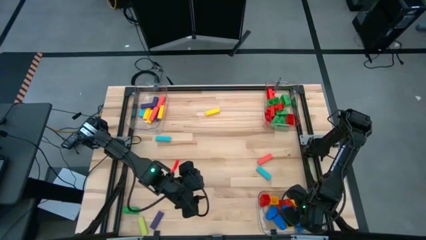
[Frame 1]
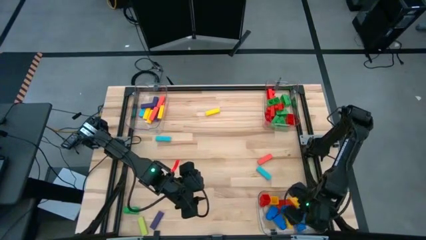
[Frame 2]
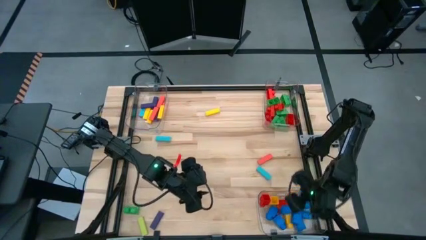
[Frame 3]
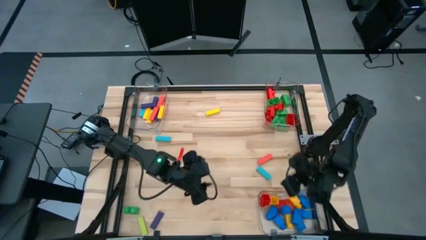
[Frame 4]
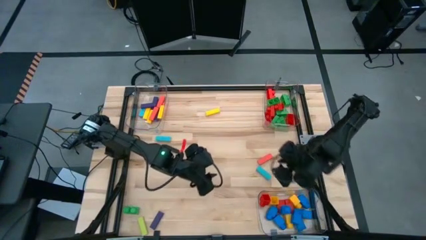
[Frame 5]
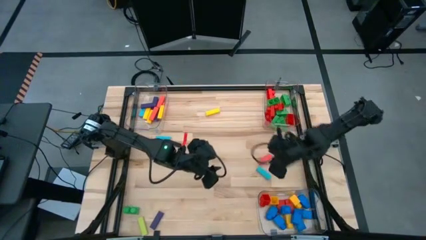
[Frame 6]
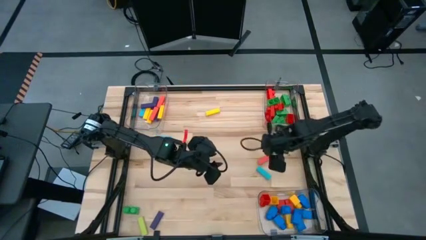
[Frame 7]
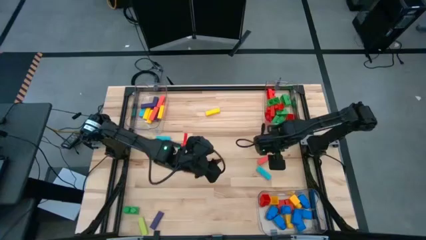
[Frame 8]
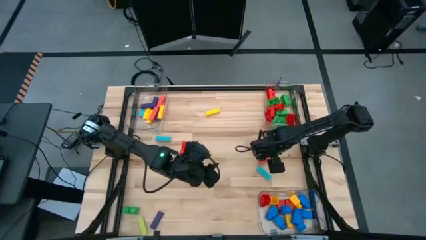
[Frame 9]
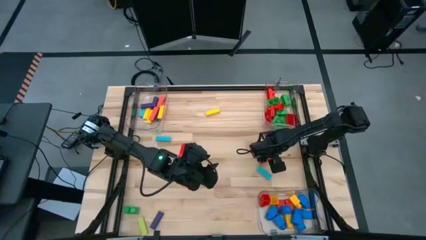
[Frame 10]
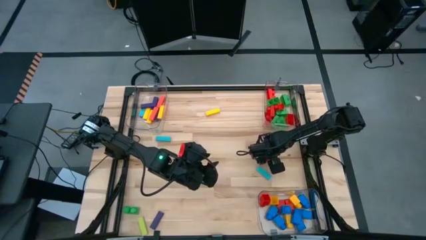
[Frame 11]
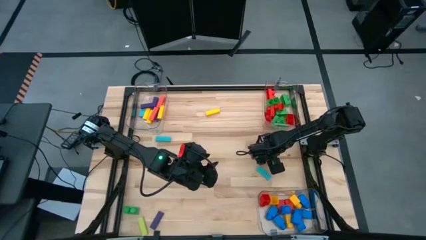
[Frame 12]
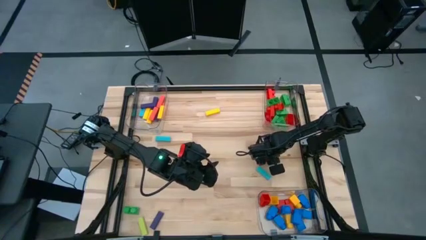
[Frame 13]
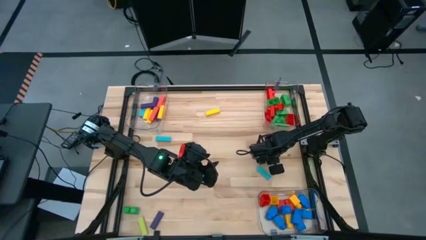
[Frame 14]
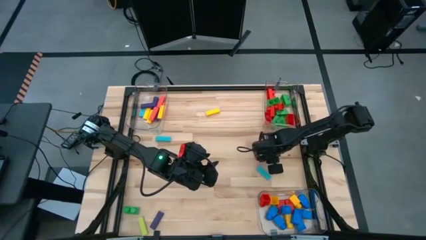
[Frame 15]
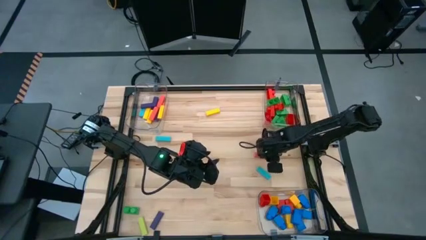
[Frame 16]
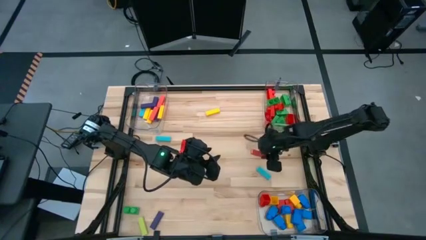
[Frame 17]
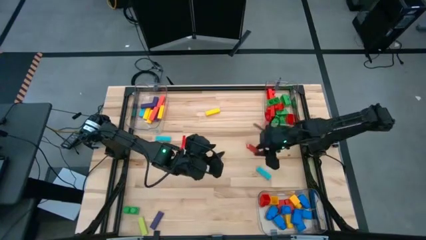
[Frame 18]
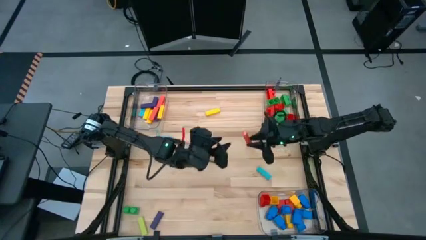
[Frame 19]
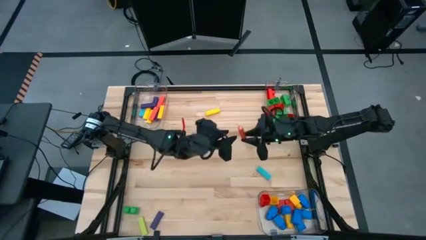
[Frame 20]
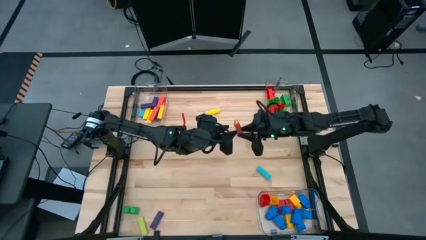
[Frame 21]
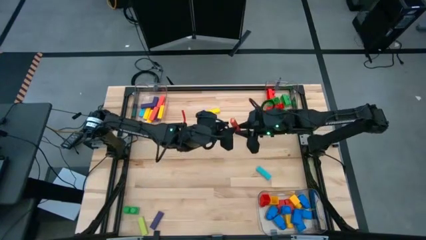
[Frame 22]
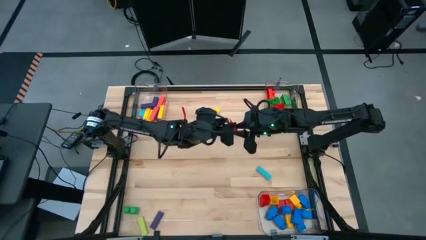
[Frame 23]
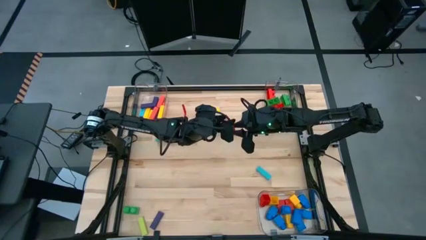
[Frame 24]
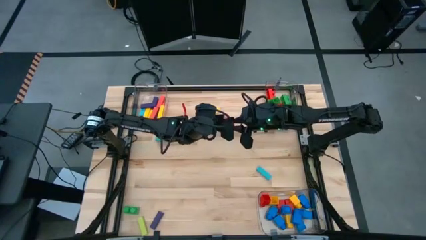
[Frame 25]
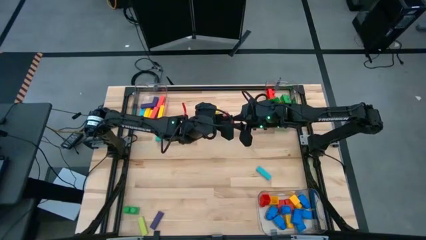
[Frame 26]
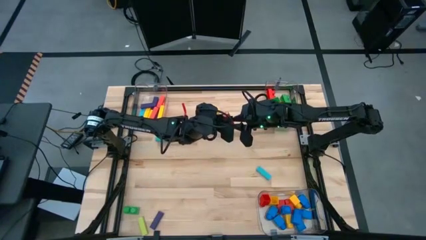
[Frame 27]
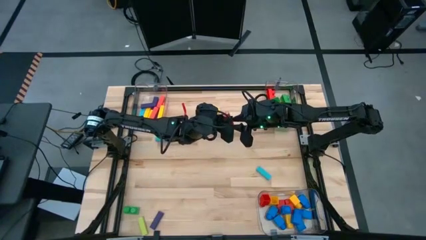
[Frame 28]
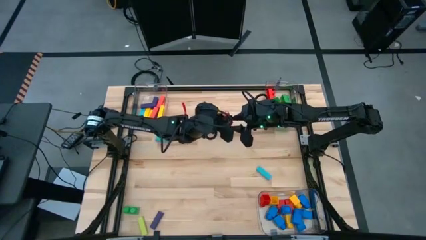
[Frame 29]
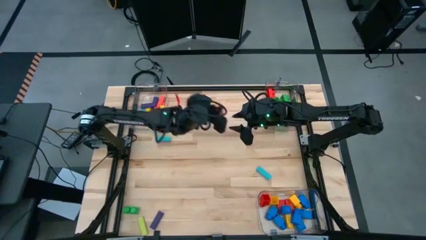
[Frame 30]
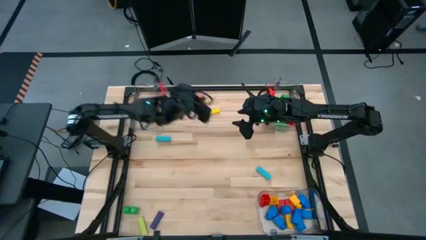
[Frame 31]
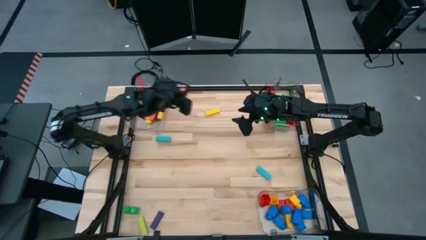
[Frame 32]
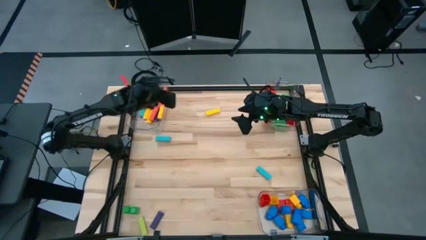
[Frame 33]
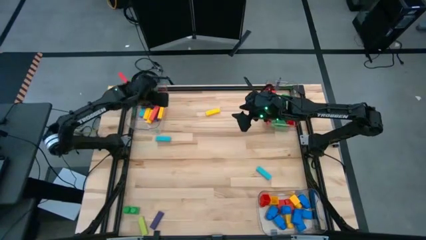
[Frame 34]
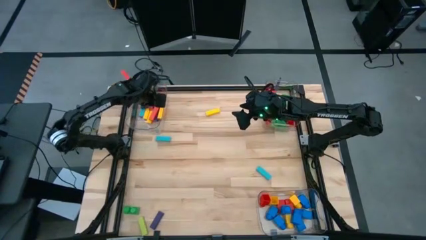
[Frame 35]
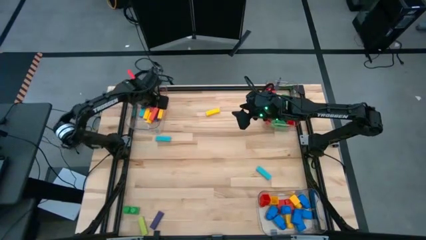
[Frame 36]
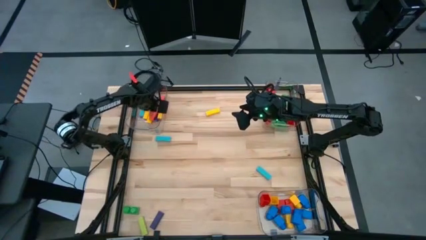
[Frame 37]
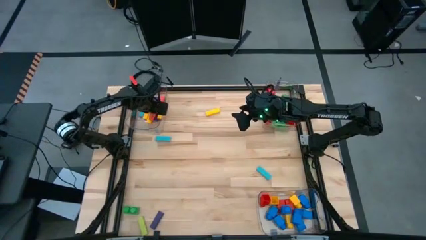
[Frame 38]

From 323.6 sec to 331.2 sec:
Task: Sort blocks by size
Put the orange block into the top left transparent bin

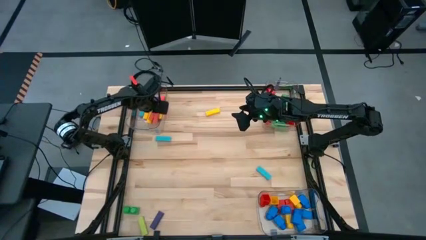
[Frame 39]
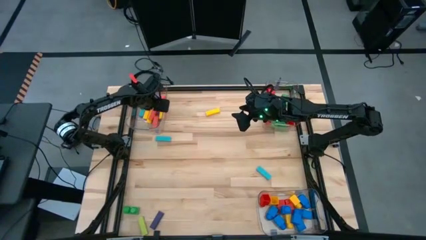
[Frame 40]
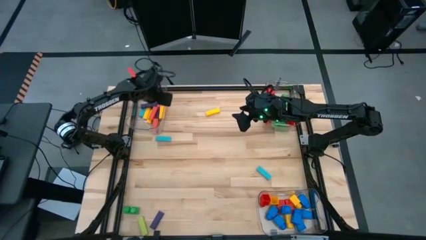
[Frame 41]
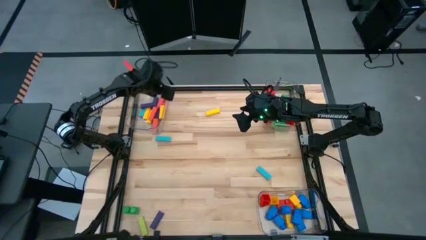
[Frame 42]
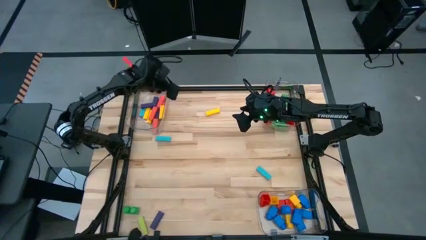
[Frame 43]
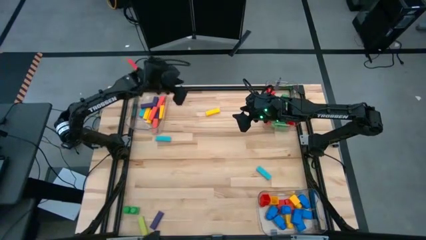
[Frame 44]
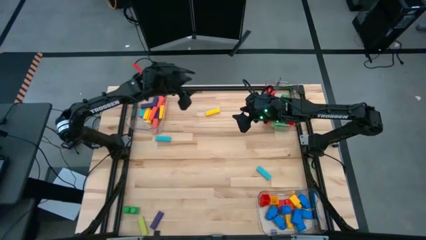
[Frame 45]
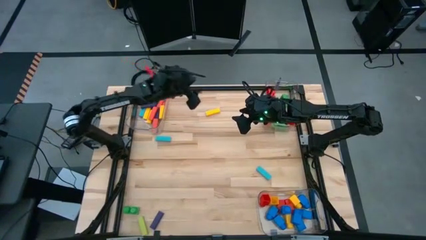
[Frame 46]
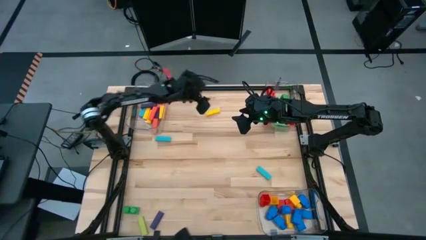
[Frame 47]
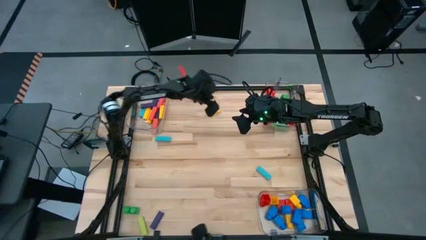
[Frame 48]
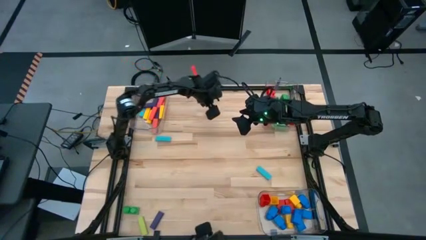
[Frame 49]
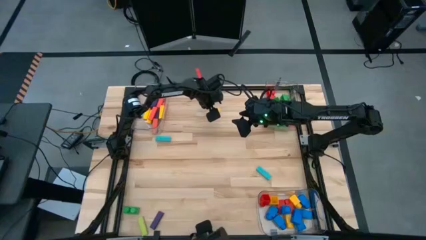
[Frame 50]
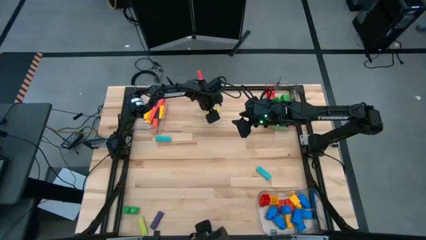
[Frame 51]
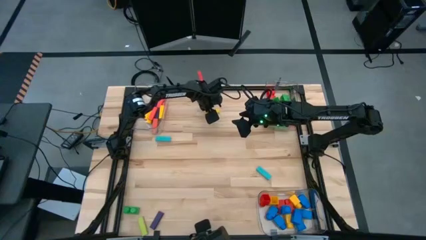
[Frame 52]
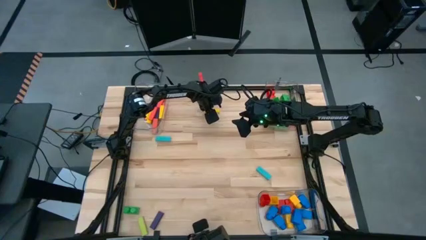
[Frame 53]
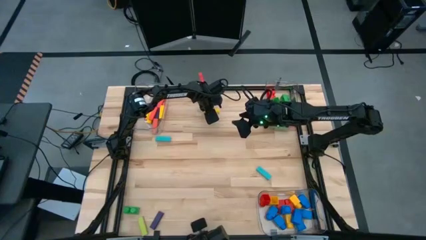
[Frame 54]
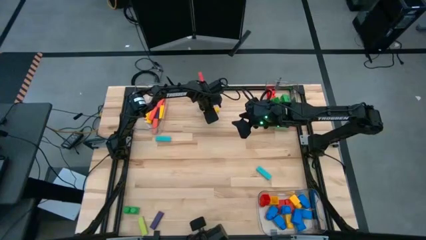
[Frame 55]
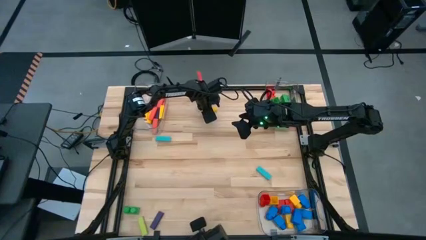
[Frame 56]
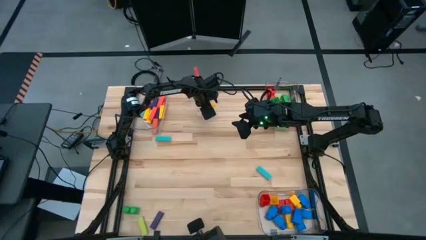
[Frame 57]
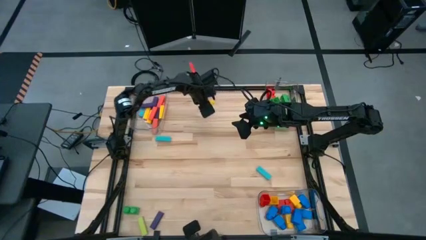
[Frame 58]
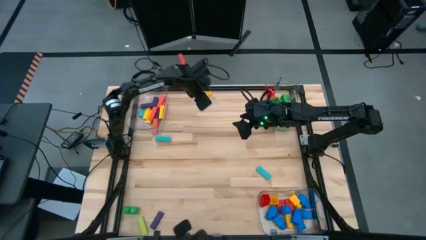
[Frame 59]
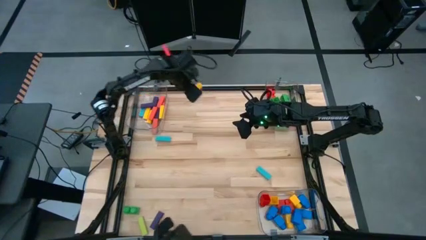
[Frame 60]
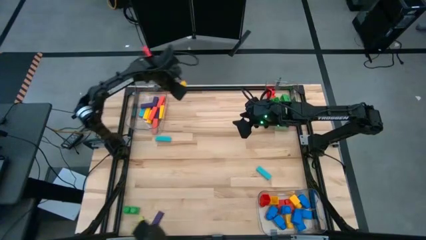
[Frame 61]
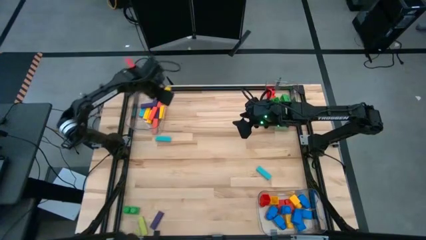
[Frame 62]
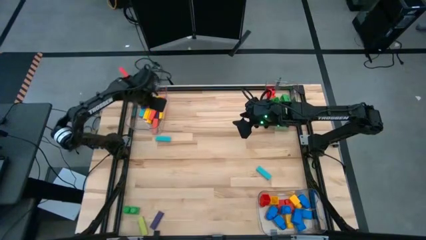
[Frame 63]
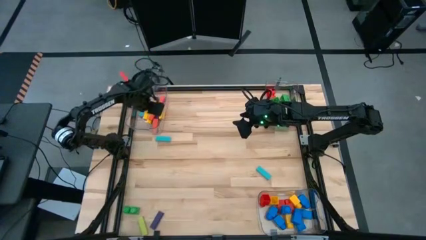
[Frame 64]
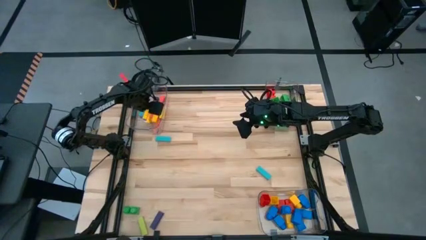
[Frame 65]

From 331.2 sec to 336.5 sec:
Put the yellow block into the top left transparent bin
